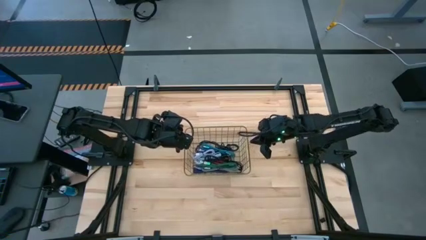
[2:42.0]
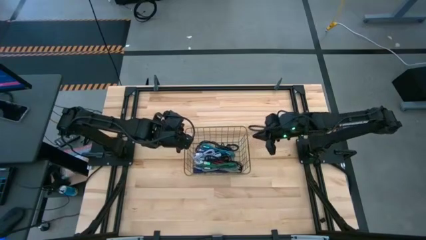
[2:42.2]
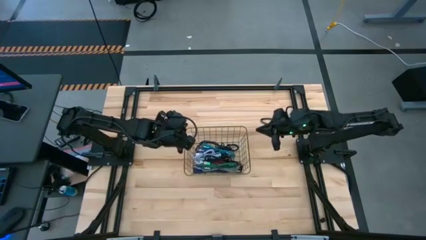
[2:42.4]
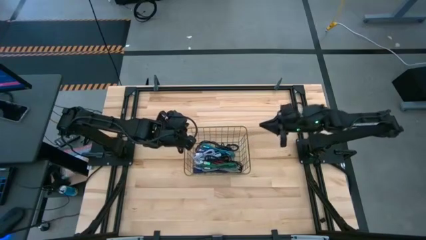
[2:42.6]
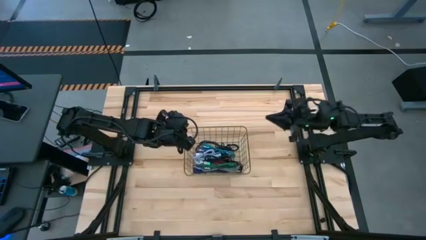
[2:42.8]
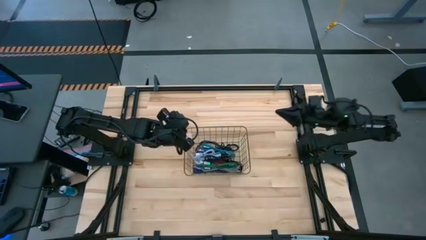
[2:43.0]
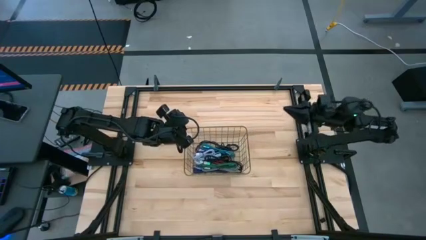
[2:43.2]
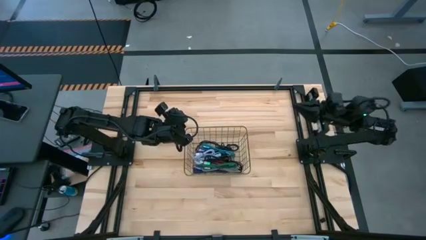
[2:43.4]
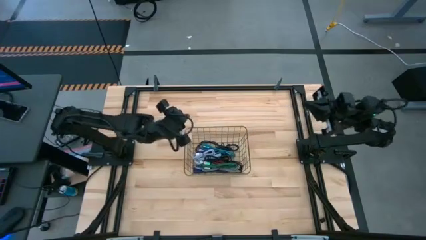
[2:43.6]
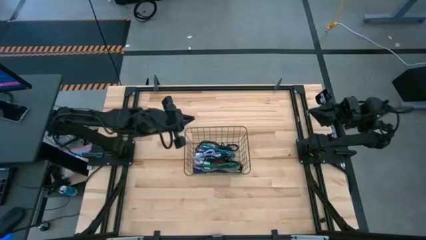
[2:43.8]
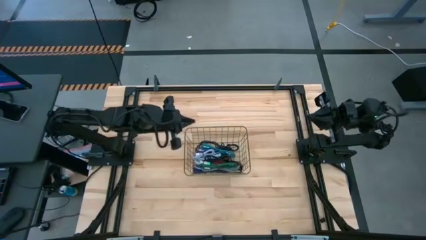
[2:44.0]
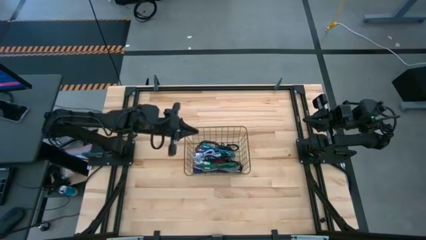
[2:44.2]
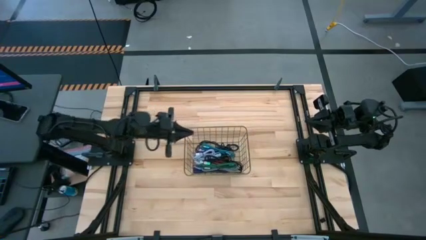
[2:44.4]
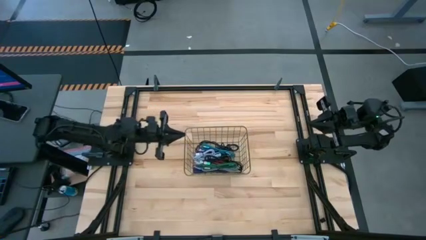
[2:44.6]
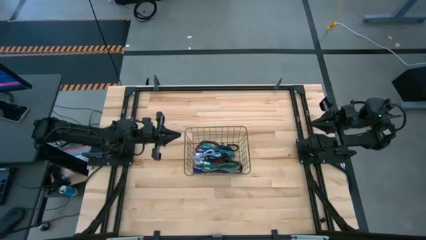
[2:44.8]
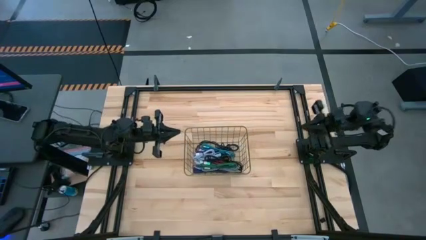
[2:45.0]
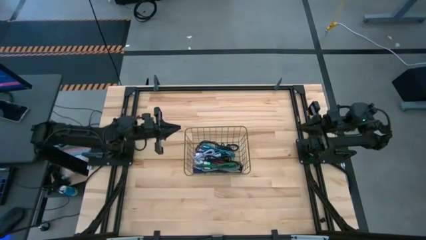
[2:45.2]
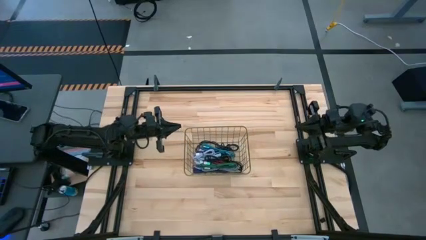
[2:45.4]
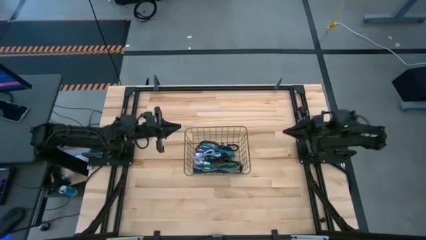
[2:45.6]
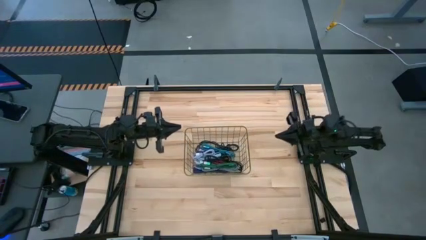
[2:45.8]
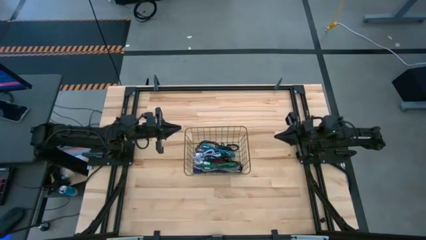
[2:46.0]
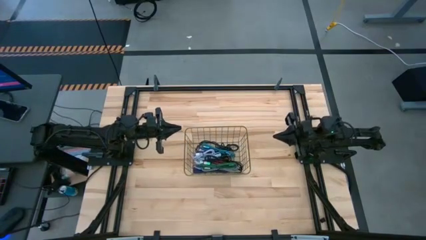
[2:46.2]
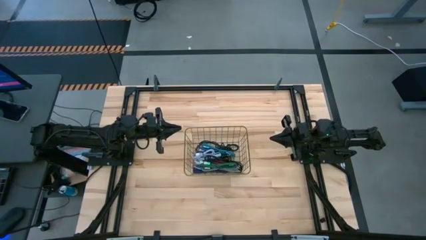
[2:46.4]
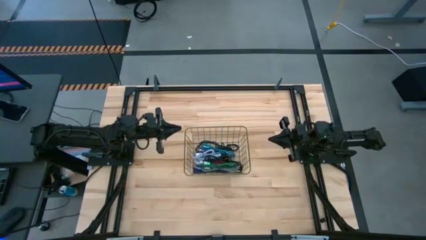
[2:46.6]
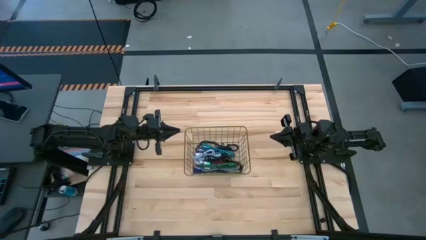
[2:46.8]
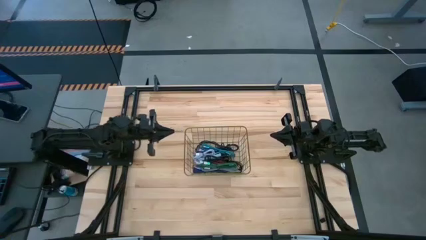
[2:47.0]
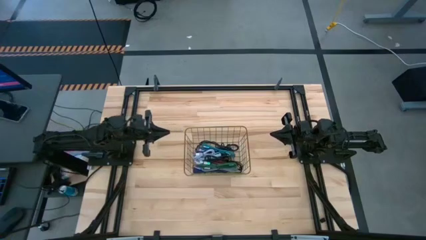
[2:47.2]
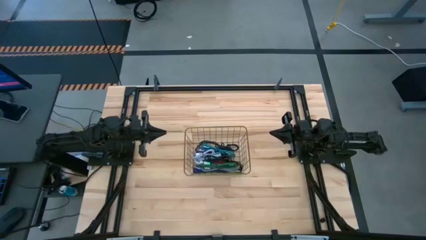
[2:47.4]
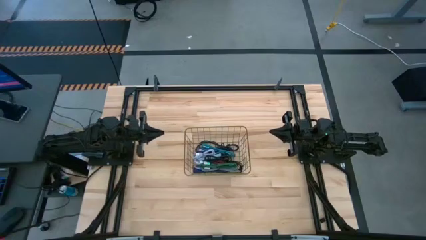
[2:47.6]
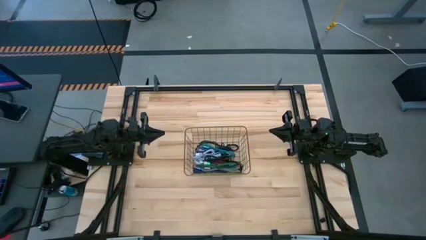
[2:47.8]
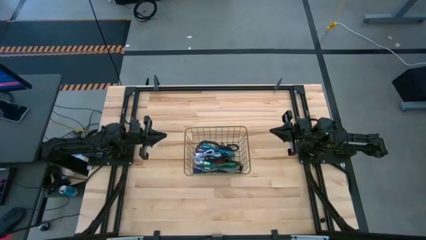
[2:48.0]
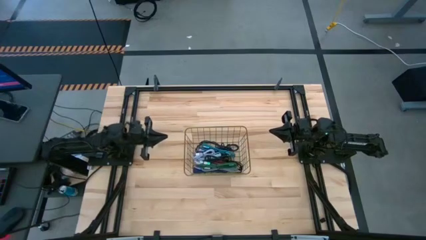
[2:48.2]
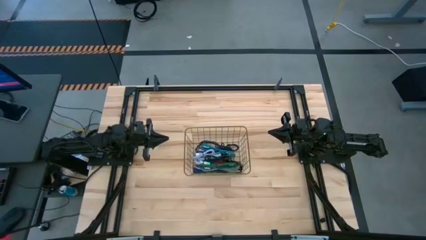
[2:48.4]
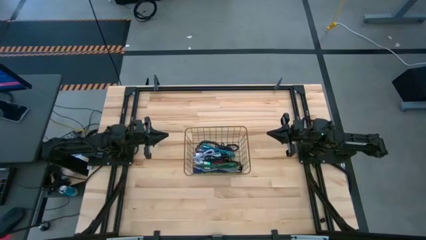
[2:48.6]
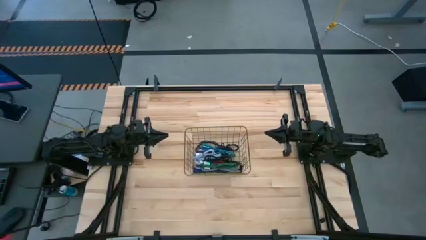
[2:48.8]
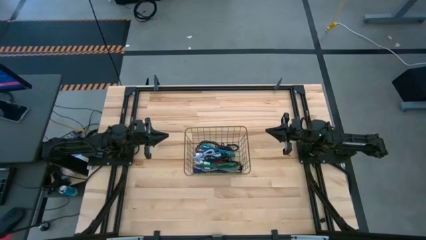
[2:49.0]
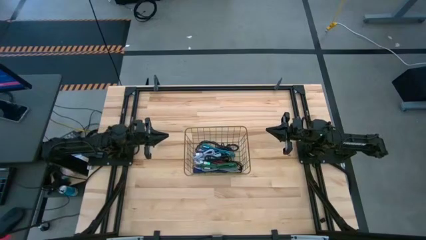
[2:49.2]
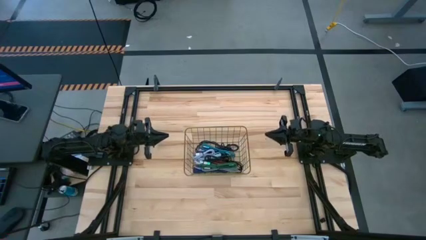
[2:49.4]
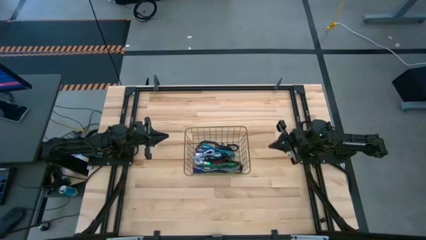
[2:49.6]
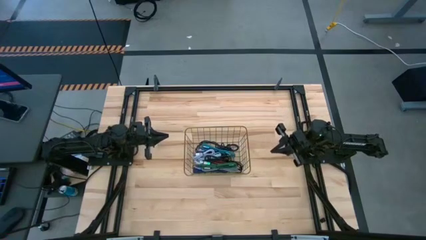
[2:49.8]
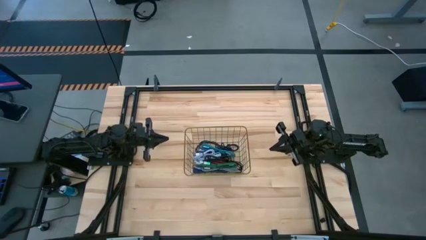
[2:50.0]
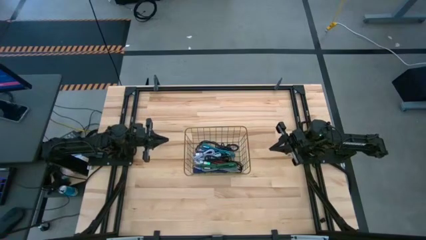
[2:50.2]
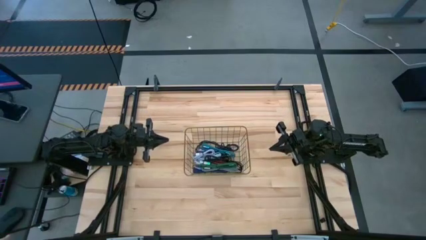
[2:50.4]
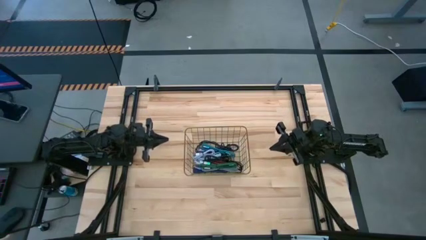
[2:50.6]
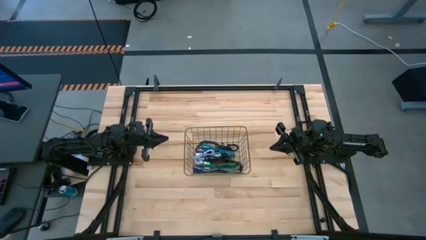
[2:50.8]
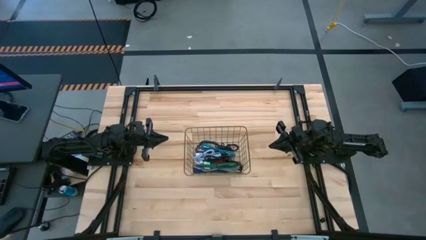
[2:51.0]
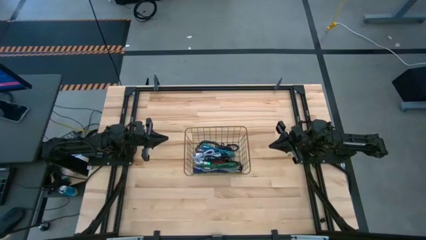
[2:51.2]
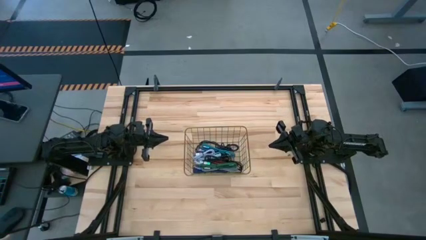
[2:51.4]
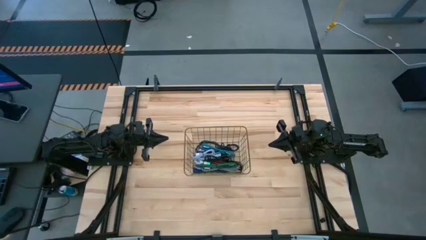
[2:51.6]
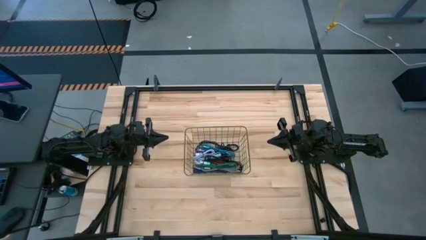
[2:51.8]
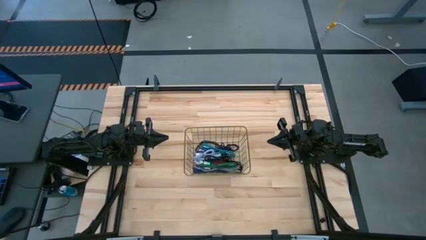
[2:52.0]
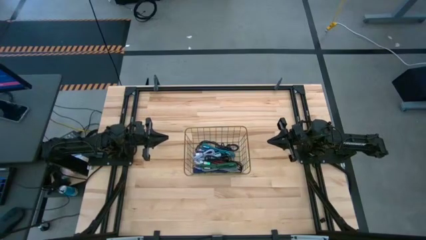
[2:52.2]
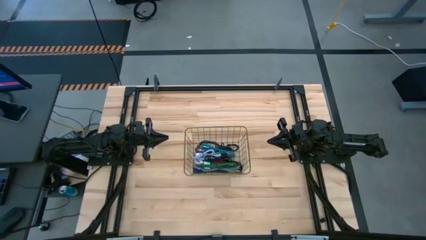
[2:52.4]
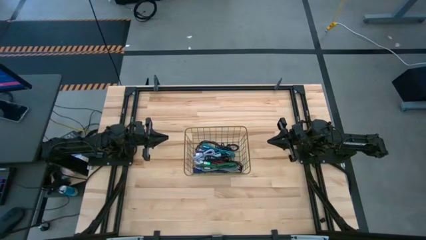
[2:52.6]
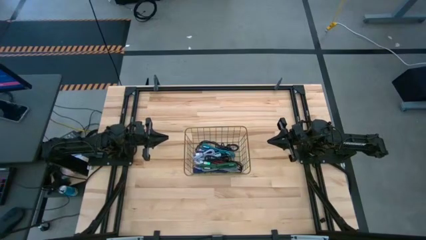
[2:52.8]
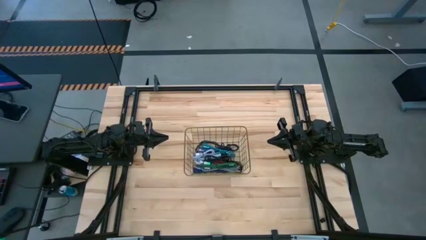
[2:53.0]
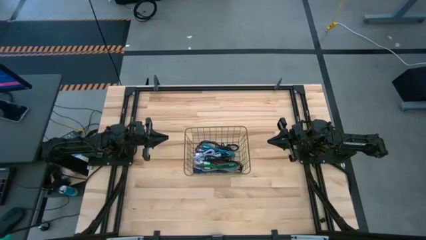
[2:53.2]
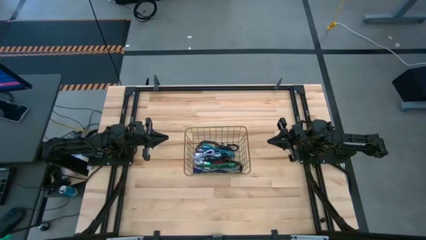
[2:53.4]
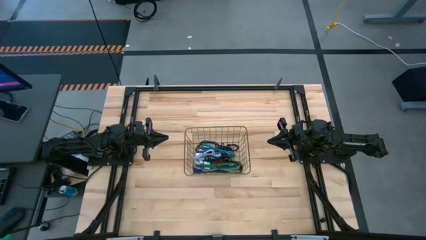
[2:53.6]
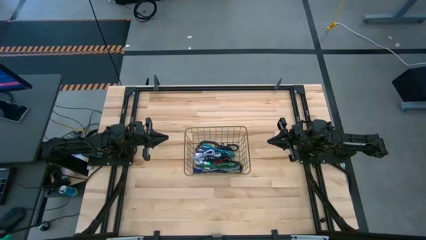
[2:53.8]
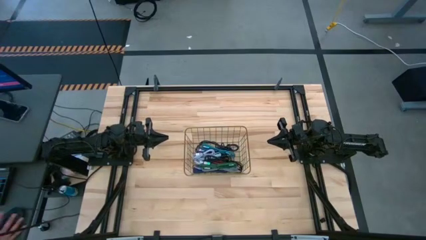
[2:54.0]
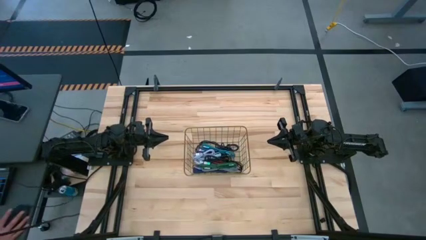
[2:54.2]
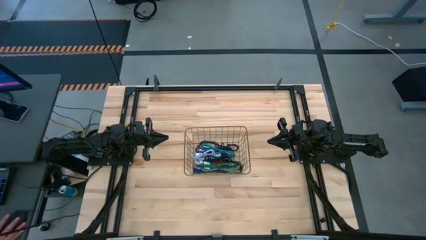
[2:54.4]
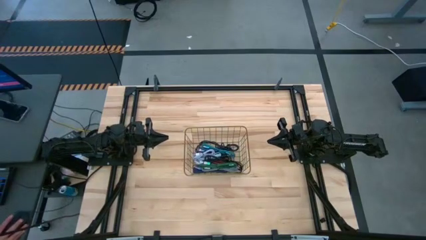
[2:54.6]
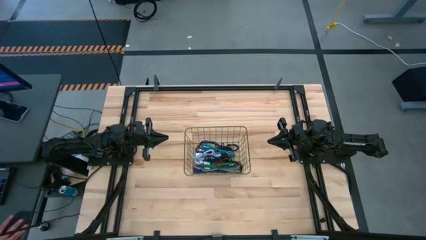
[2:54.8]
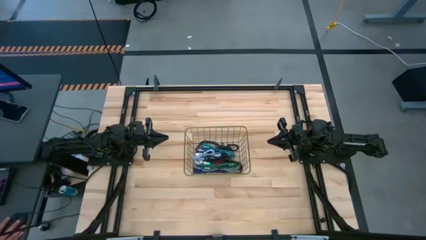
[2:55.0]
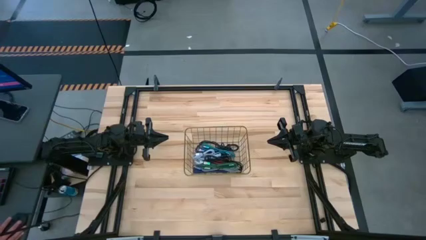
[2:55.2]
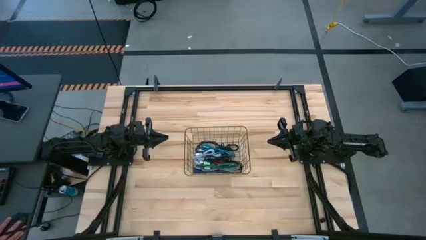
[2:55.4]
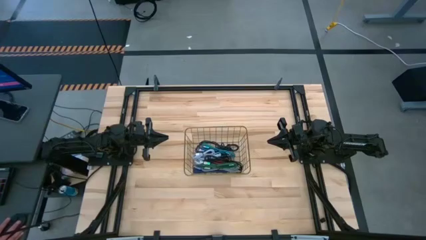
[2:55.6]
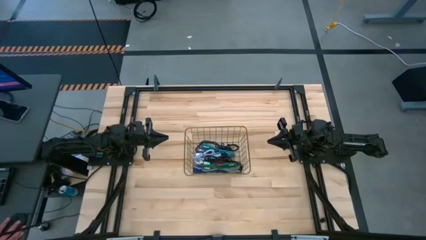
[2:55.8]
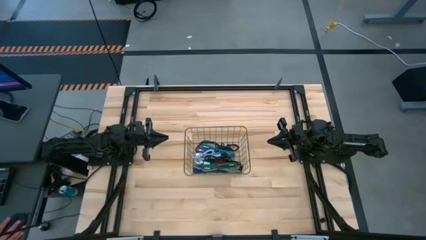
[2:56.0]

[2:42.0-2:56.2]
Task: Pick and place USB-C Cables
Return to Home Position
